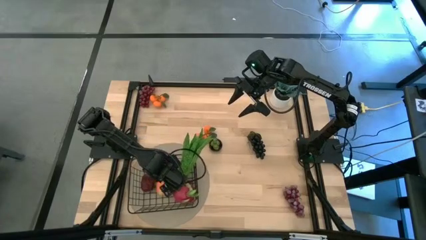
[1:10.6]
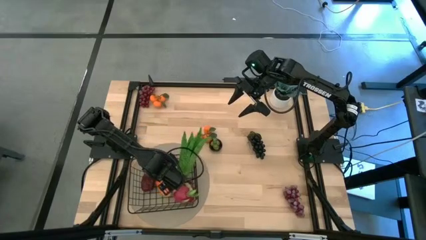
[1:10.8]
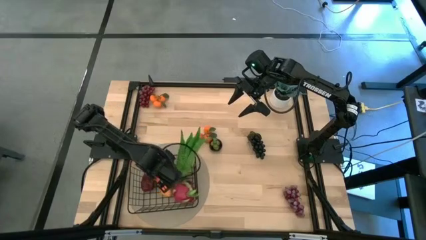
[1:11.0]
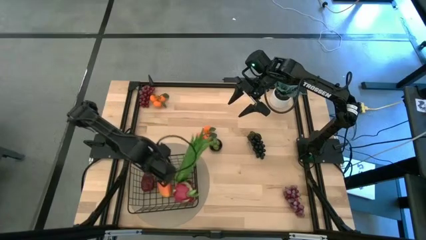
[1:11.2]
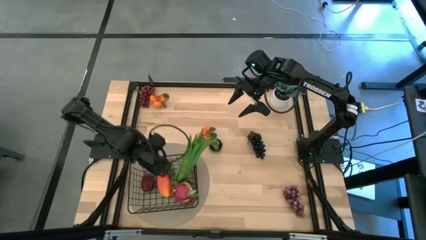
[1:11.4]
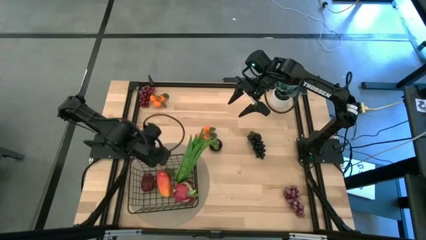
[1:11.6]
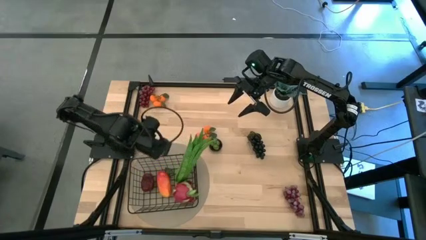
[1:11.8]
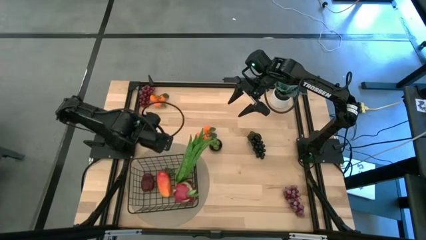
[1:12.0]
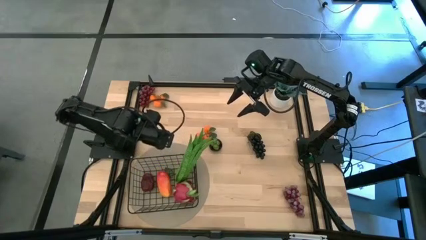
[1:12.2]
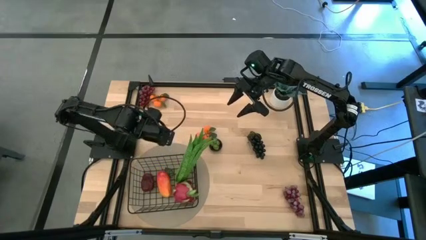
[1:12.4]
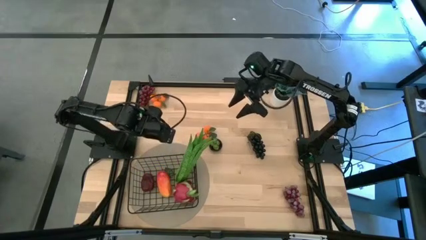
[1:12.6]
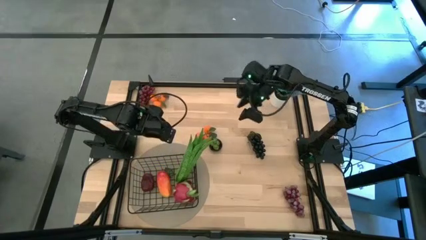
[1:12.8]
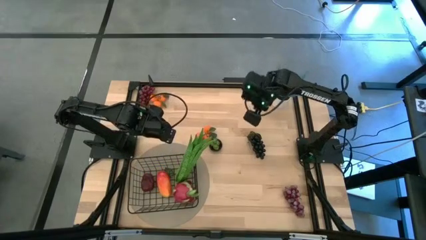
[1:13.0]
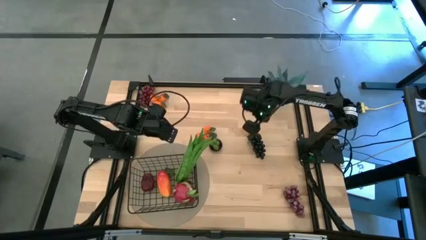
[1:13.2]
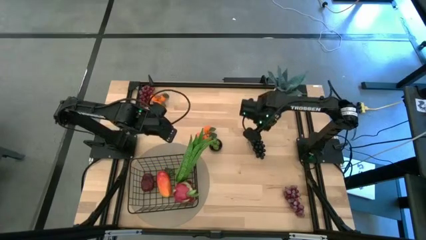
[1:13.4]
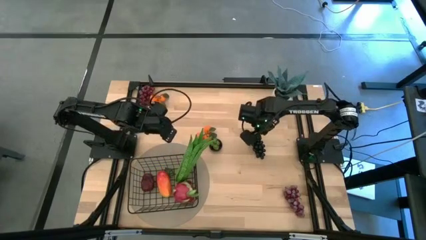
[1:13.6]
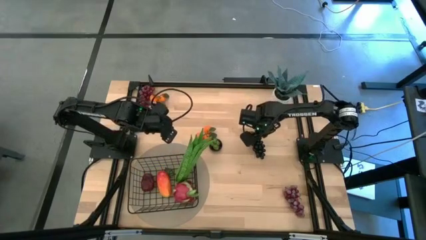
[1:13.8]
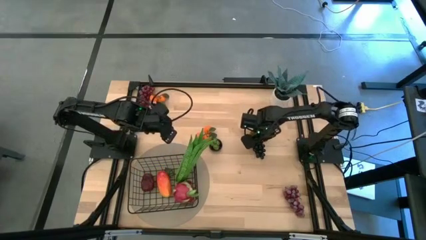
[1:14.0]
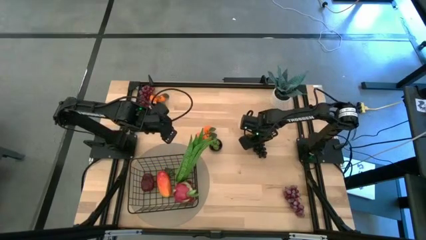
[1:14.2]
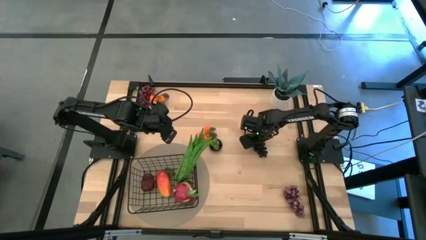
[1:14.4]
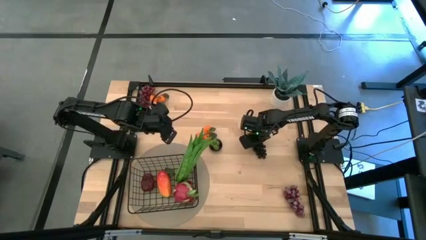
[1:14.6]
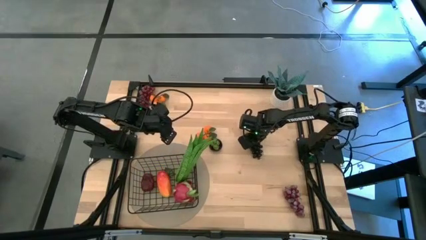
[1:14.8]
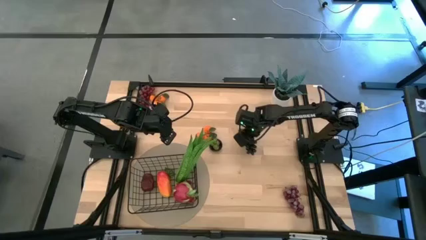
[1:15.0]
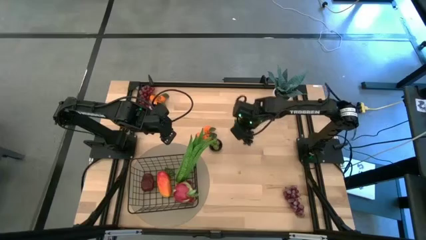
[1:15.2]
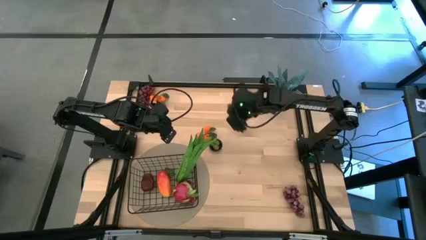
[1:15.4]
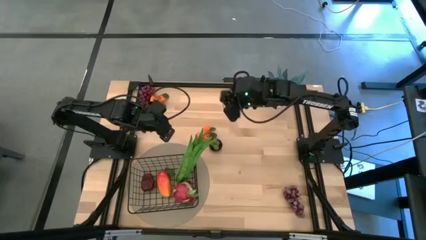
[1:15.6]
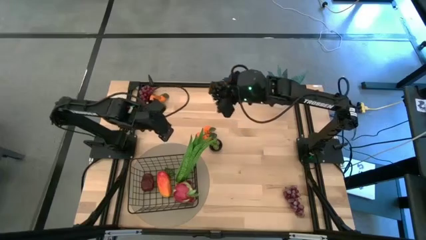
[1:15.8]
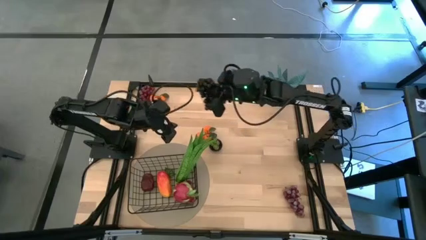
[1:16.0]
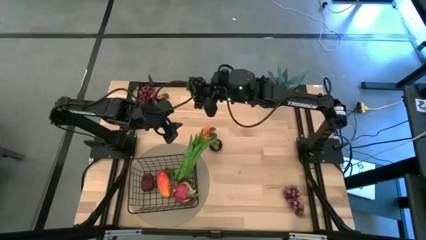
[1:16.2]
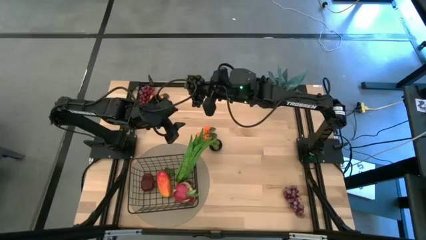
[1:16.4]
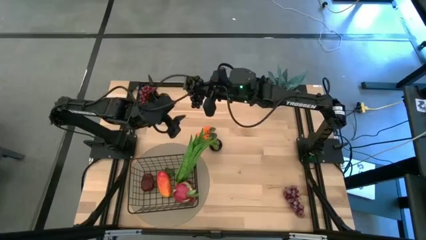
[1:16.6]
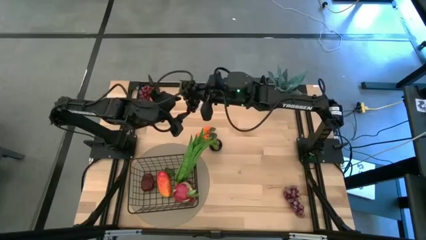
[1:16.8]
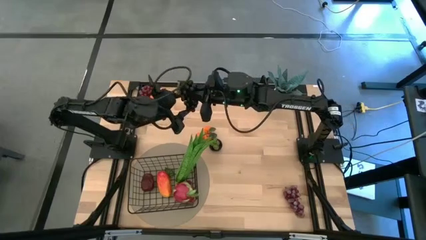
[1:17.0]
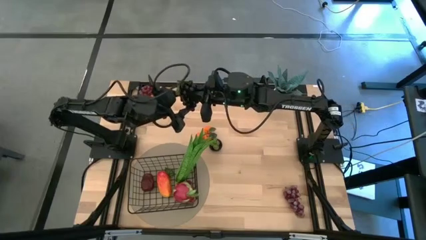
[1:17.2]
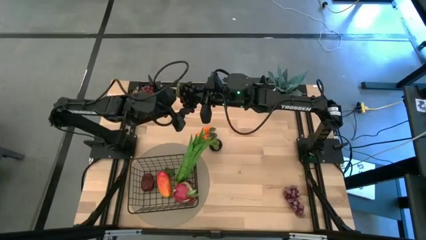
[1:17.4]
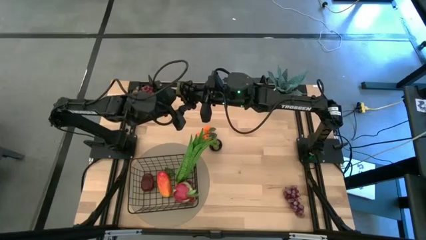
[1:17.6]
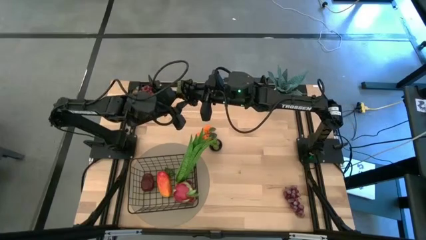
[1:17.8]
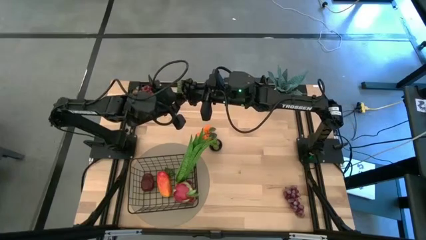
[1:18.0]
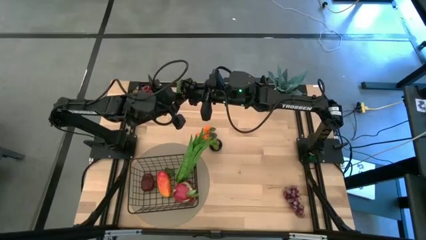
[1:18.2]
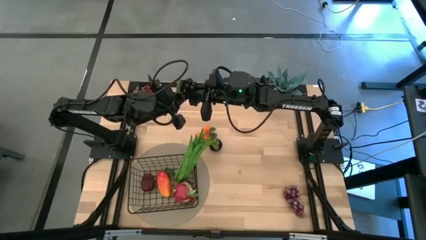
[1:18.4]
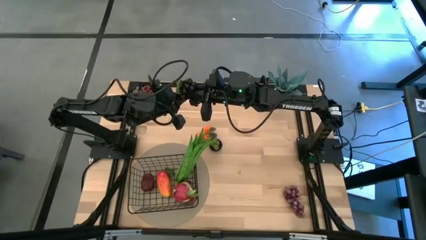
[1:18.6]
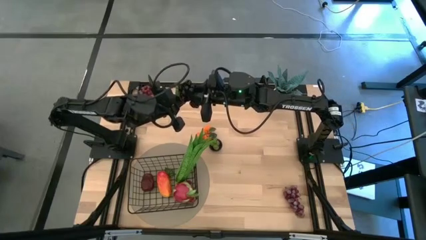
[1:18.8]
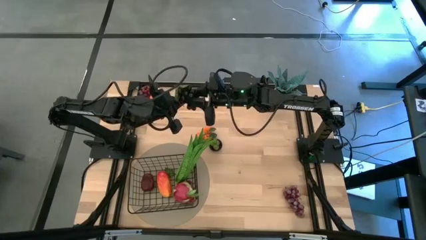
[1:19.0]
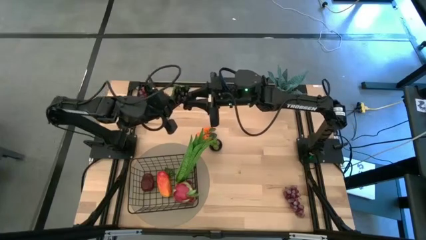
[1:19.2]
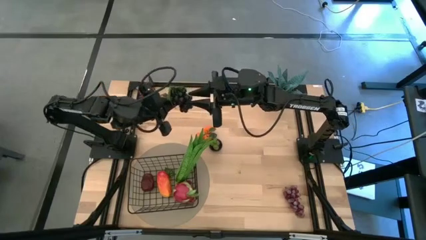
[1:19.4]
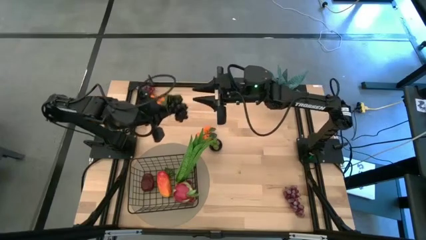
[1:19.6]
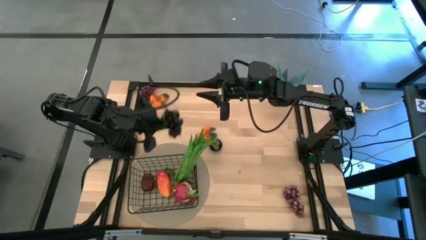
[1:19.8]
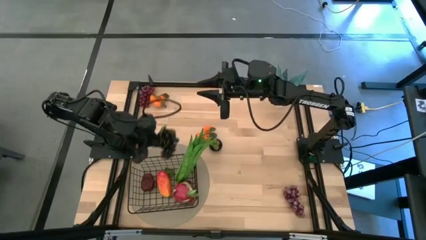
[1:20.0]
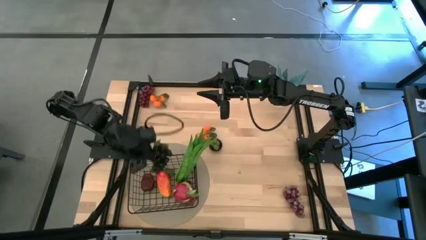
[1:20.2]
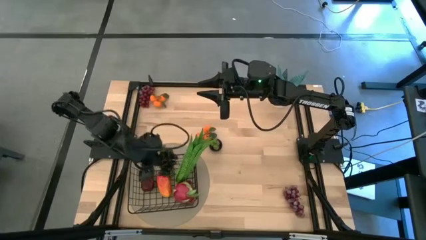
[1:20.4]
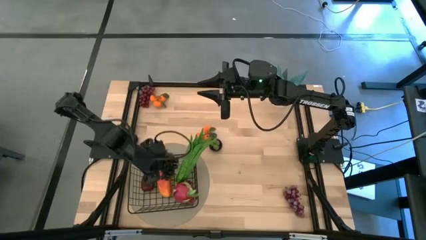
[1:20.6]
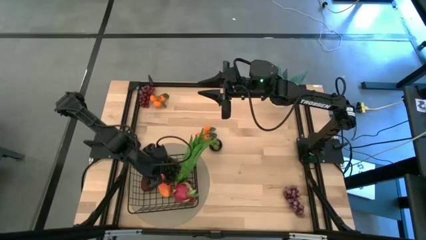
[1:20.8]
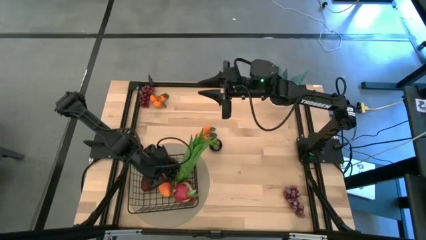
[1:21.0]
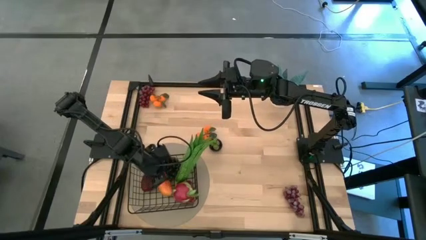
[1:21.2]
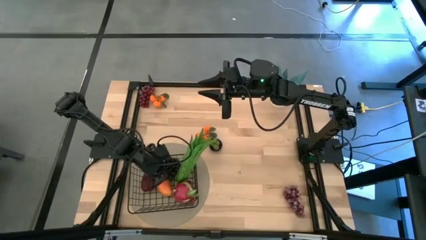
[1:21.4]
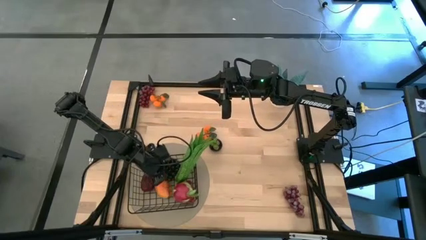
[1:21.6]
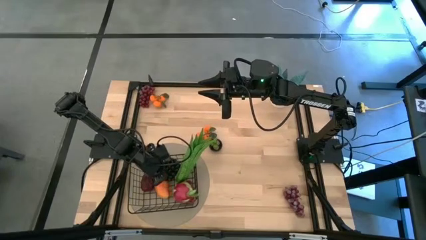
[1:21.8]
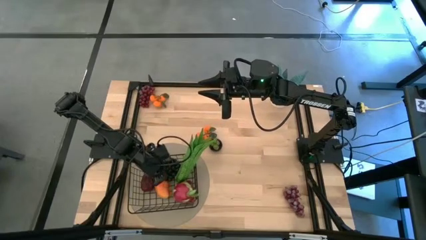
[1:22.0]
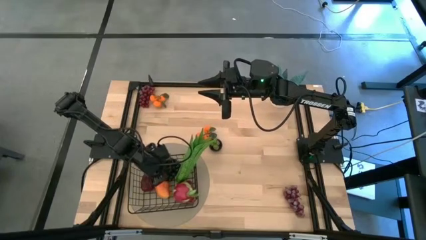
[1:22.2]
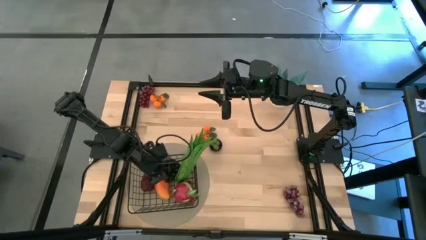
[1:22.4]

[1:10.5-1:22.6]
Task: Build produce basket
Put the black grapes into the black wire basket

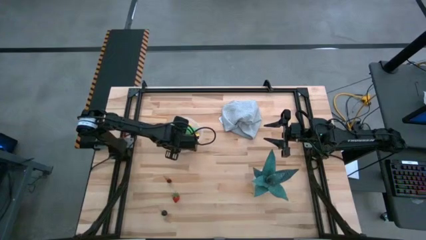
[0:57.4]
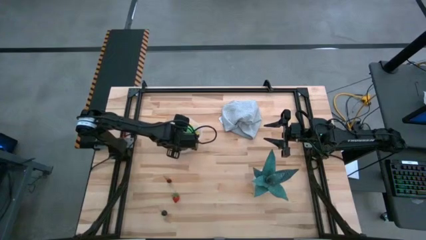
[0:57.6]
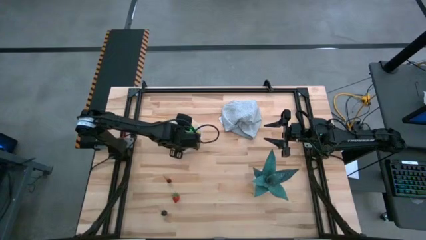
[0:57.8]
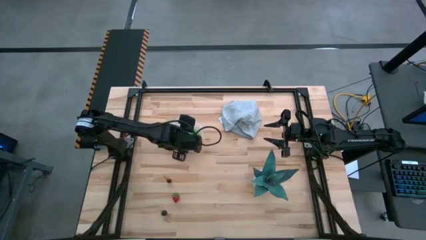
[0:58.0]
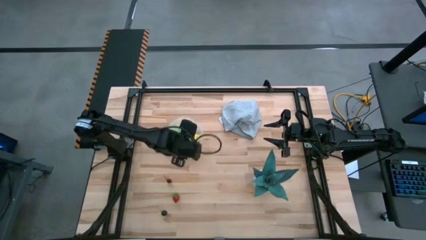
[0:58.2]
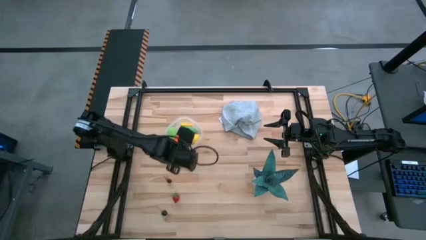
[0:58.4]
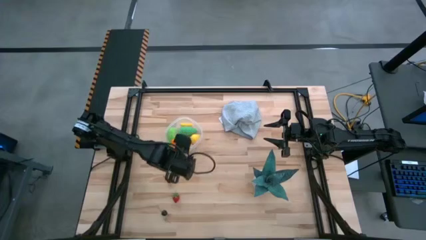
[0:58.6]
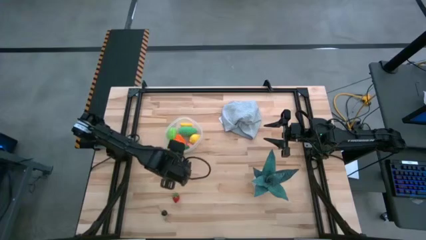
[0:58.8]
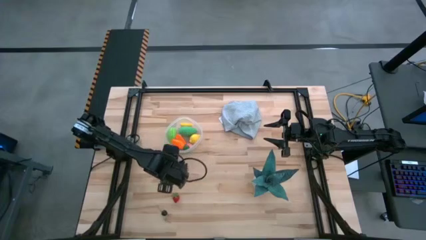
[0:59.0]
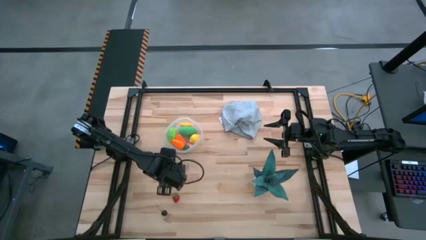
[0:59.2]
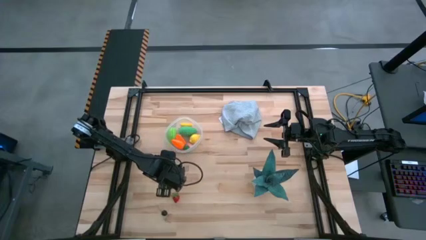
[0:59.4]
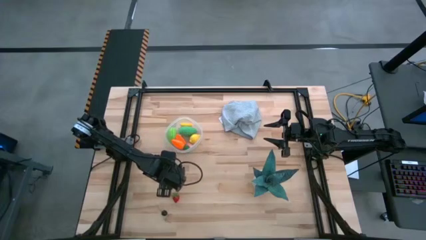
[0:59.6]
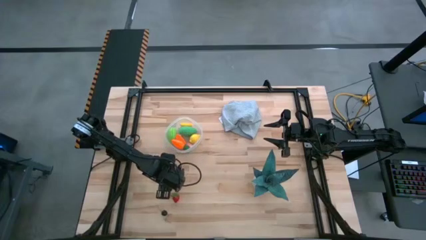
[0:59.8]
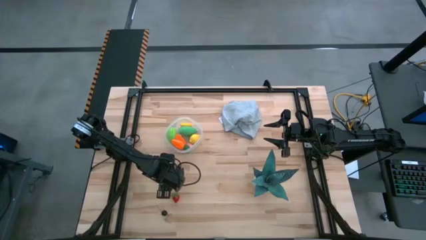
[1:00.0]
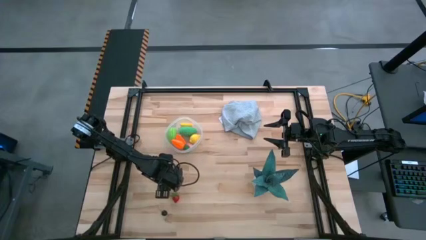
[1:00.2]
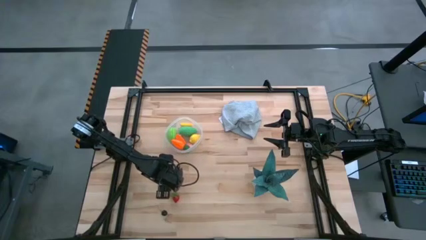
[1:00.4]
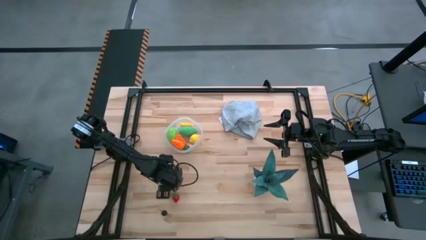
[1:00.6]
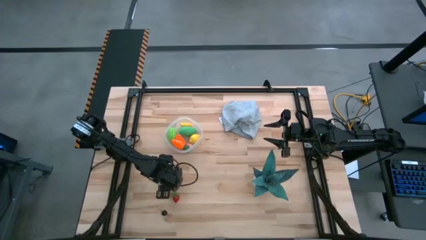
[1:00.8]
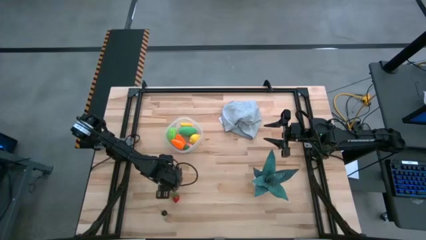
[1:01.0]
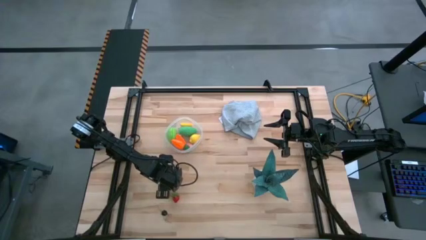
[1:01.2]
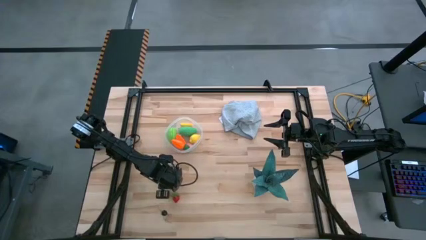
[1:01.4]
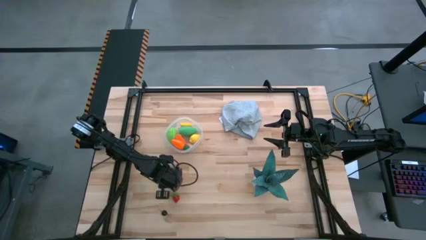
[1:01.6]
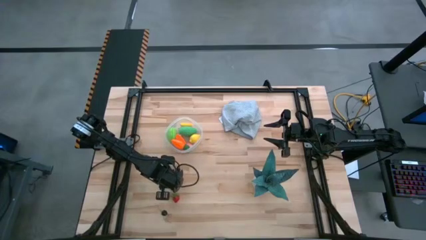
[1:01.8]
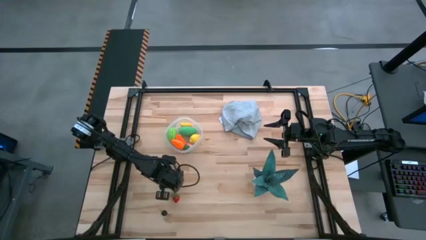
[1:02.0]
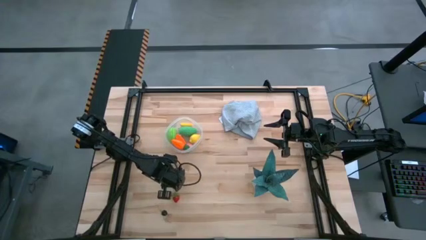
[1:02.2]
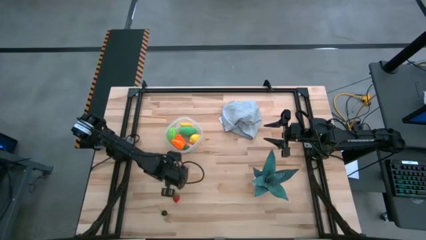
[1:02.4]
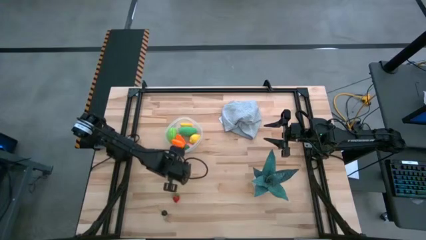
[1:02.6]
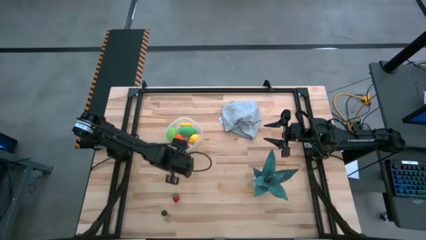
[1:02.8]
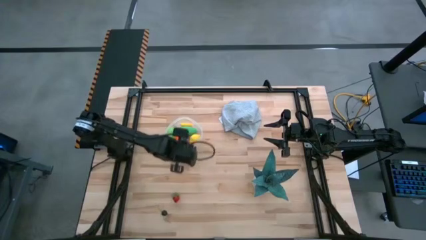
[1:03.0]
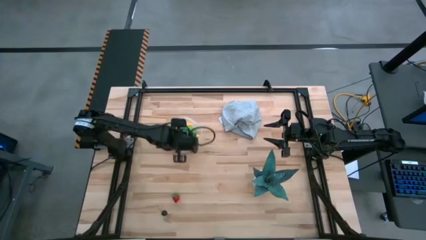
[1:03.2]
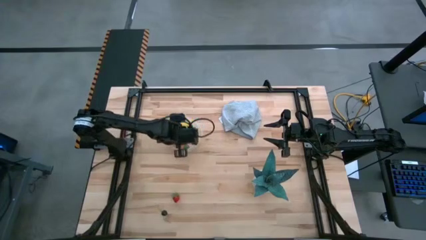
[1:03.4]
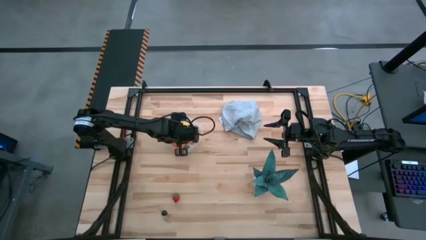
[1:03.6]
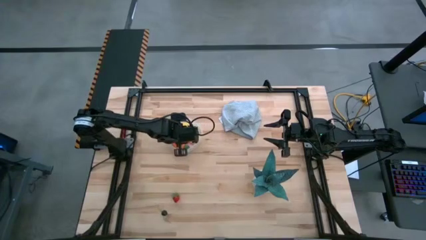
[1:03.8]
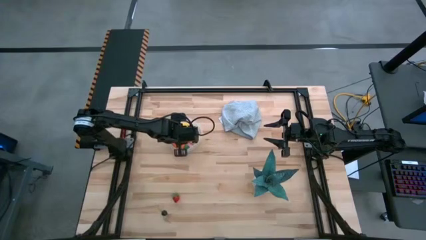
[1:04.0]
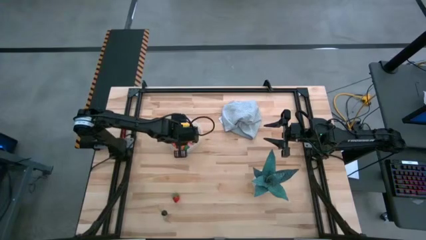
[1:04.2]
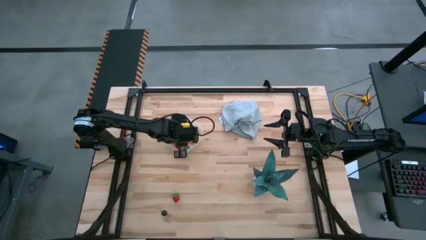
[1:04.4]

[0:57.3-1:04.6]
Task: Pick and placing Produce into tupperware
Put the red and black cherry into the transparent container
